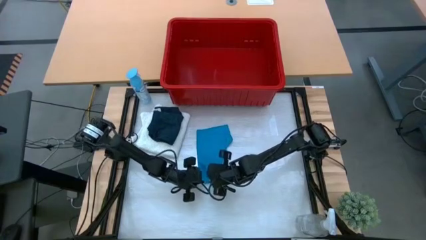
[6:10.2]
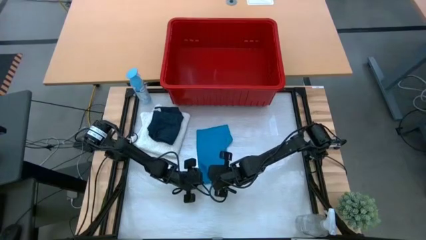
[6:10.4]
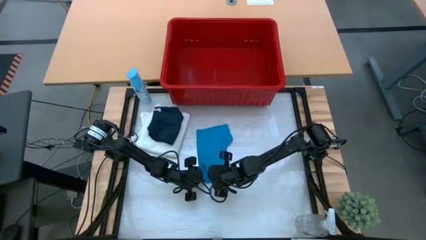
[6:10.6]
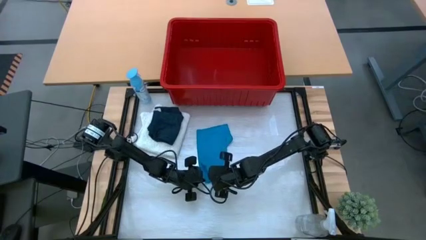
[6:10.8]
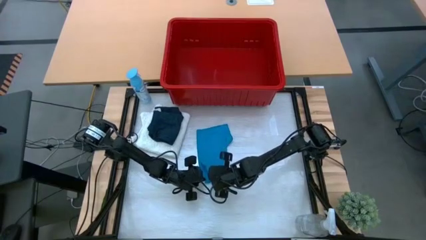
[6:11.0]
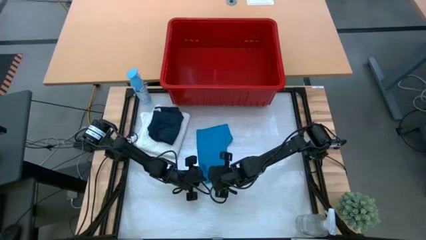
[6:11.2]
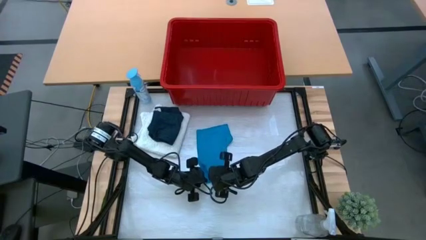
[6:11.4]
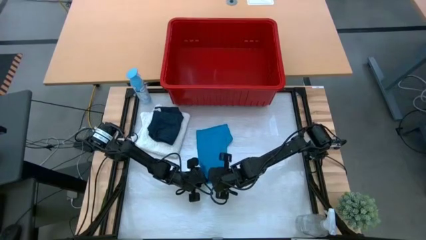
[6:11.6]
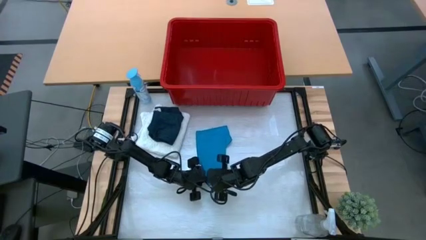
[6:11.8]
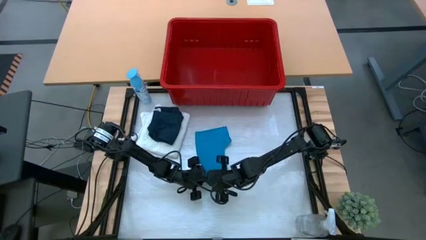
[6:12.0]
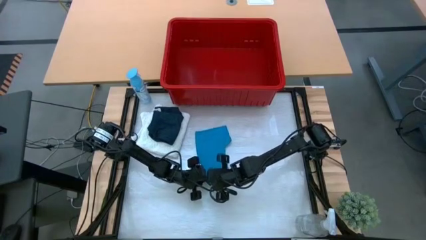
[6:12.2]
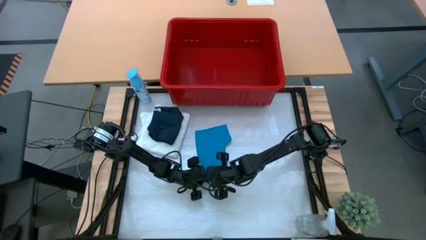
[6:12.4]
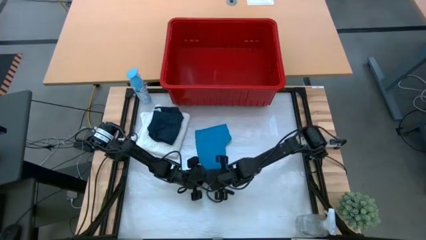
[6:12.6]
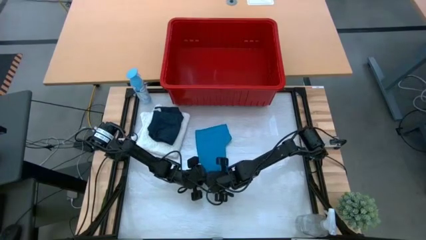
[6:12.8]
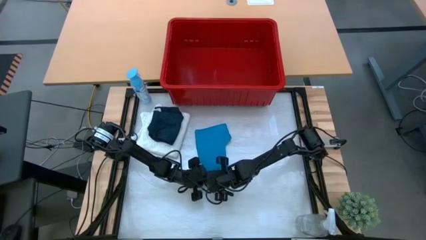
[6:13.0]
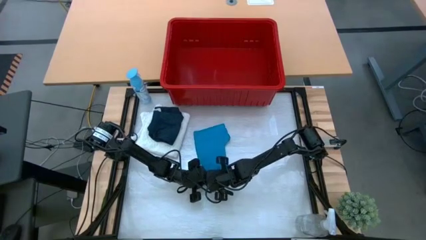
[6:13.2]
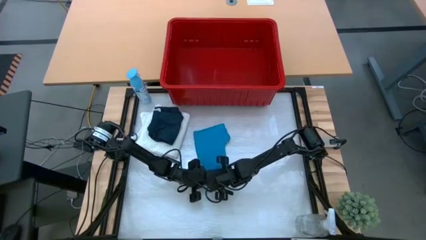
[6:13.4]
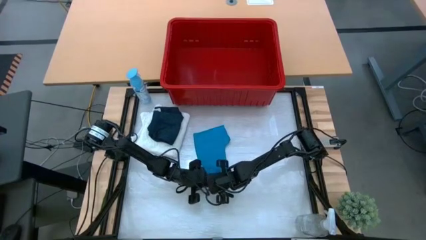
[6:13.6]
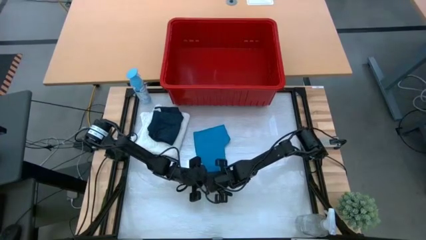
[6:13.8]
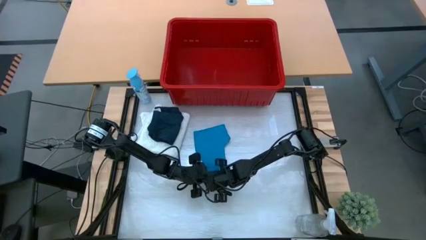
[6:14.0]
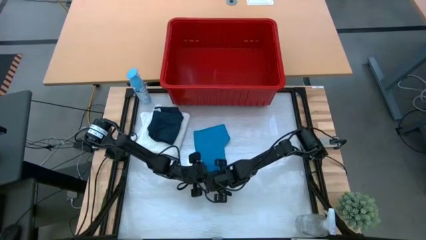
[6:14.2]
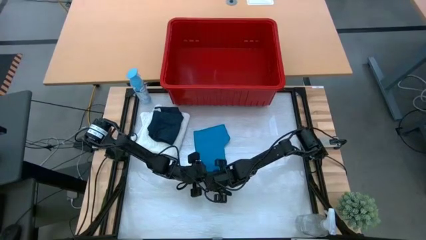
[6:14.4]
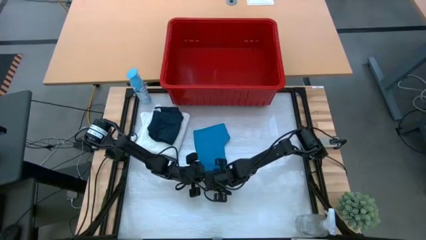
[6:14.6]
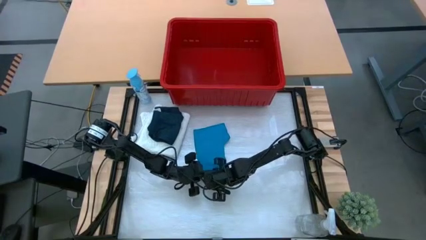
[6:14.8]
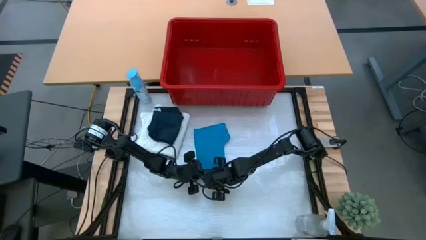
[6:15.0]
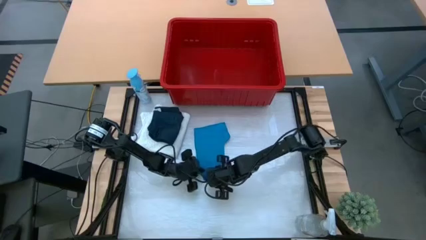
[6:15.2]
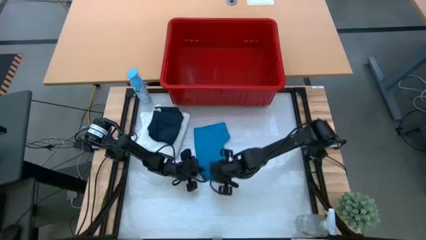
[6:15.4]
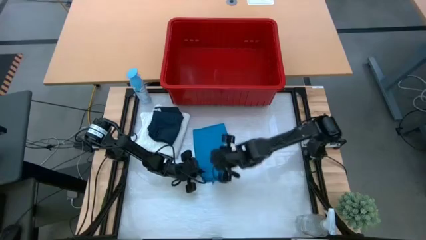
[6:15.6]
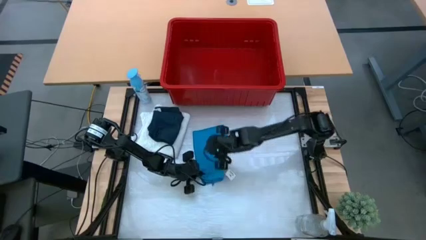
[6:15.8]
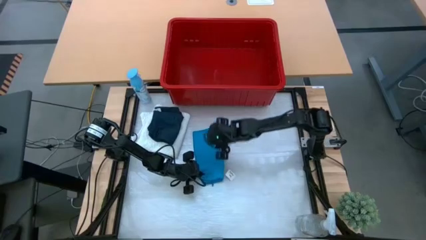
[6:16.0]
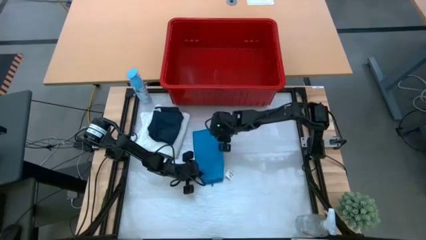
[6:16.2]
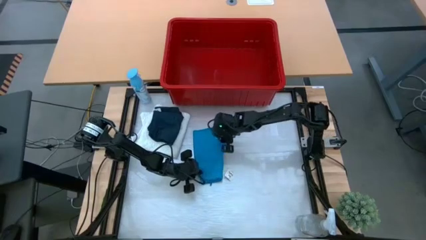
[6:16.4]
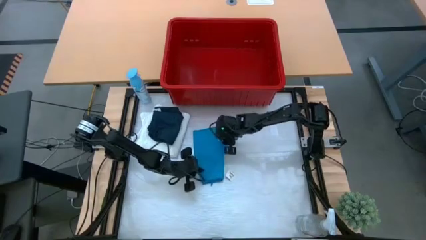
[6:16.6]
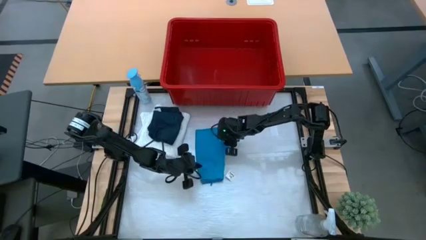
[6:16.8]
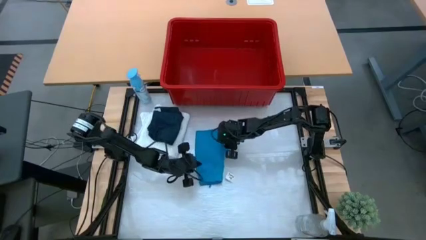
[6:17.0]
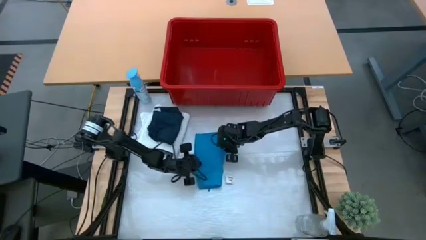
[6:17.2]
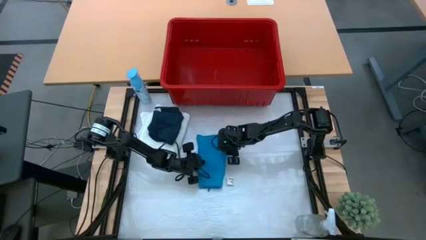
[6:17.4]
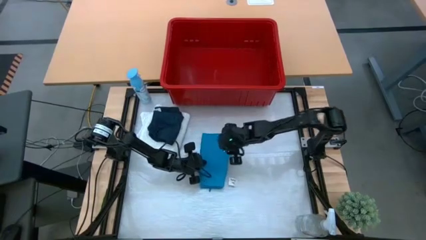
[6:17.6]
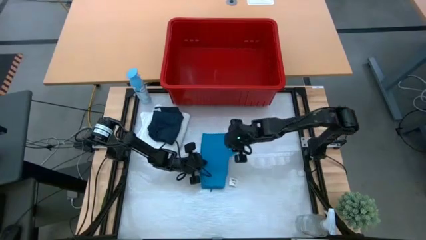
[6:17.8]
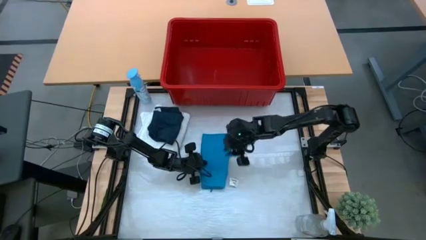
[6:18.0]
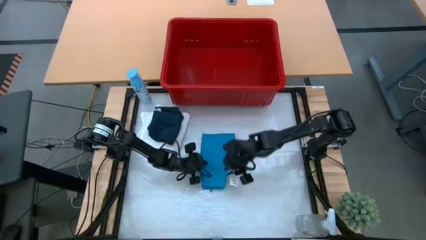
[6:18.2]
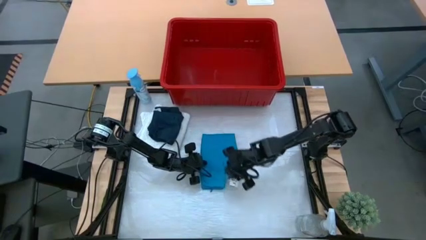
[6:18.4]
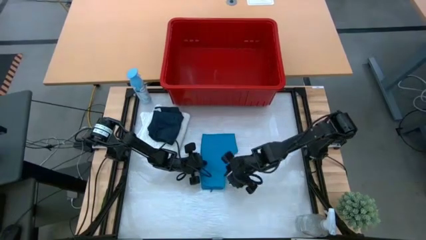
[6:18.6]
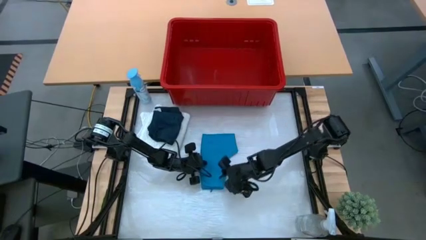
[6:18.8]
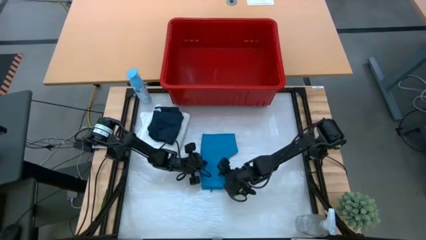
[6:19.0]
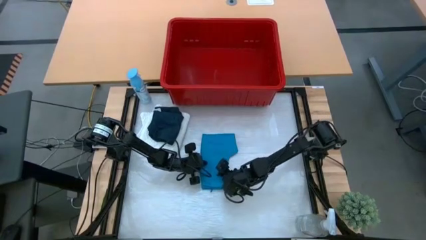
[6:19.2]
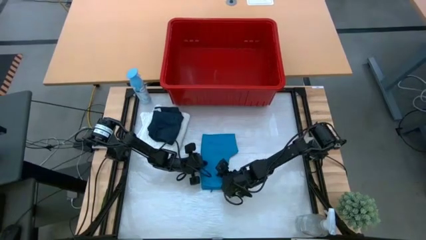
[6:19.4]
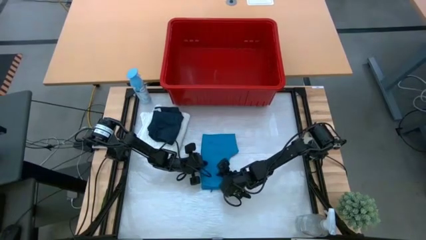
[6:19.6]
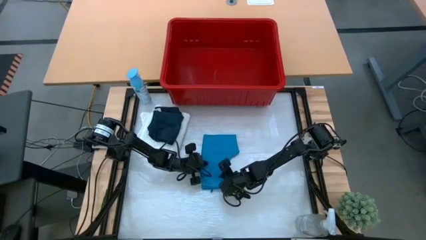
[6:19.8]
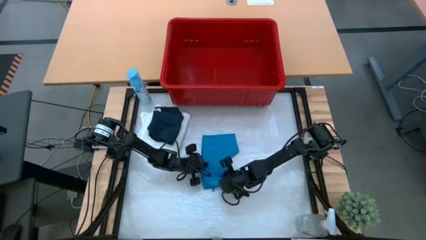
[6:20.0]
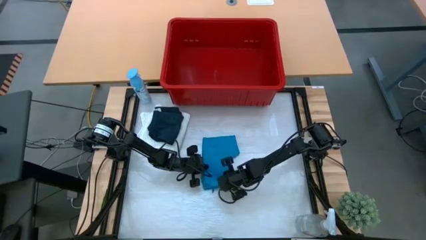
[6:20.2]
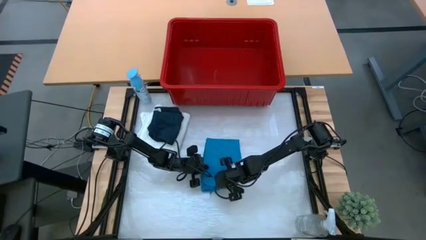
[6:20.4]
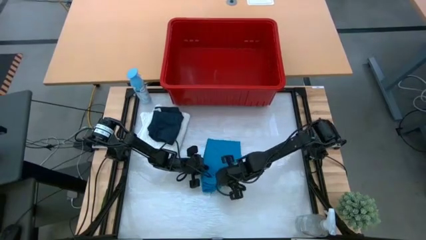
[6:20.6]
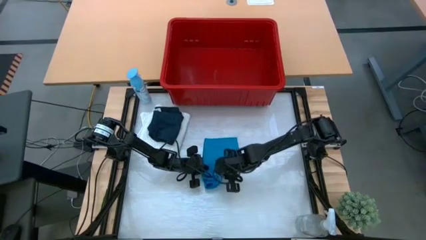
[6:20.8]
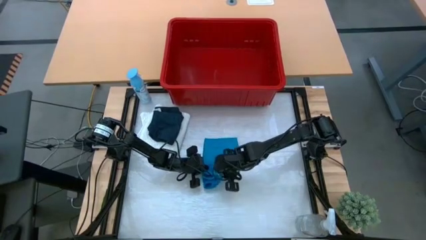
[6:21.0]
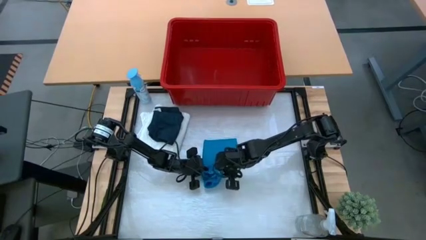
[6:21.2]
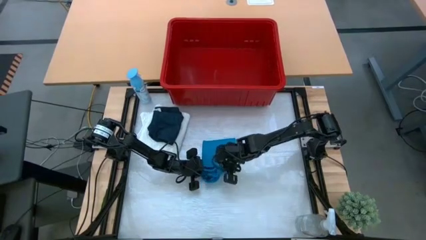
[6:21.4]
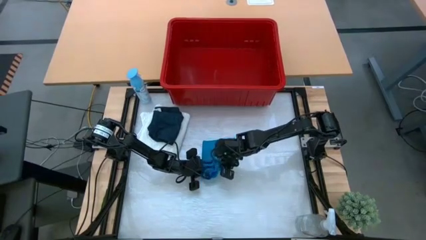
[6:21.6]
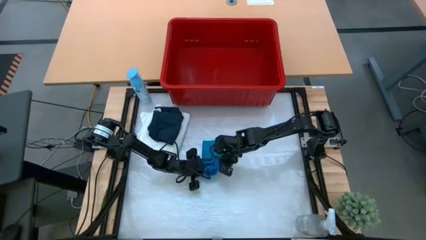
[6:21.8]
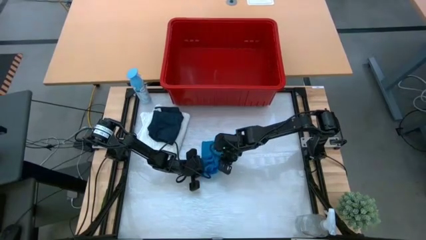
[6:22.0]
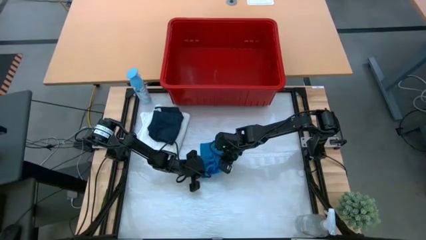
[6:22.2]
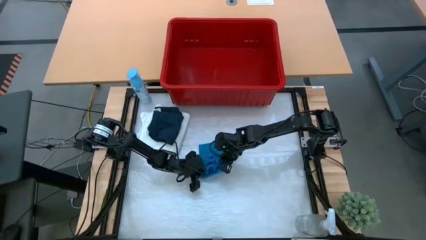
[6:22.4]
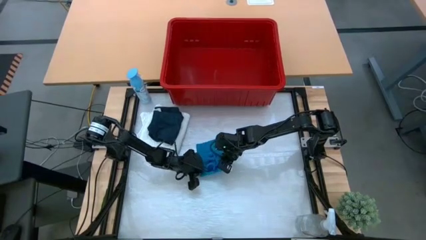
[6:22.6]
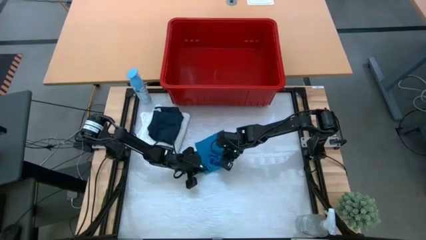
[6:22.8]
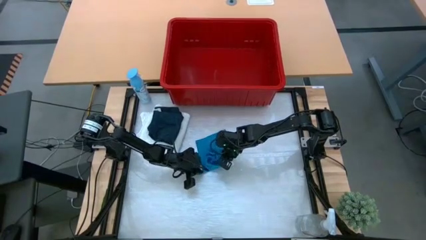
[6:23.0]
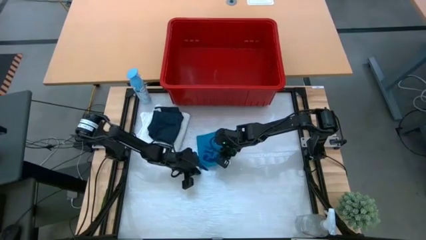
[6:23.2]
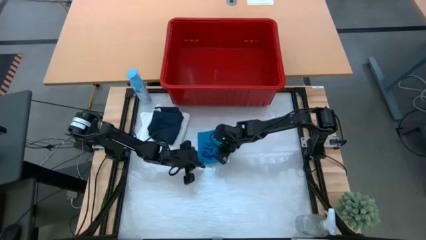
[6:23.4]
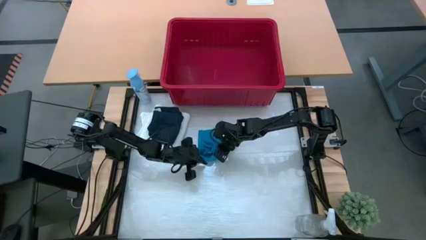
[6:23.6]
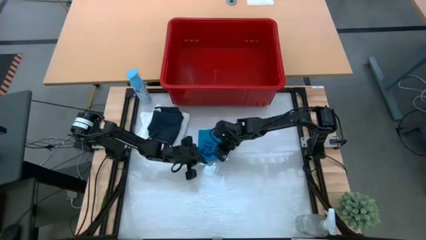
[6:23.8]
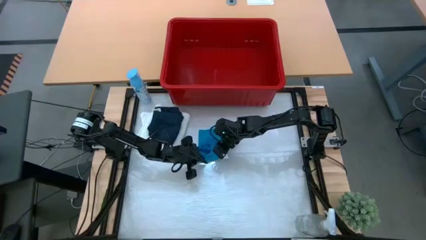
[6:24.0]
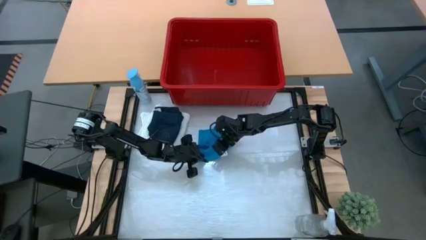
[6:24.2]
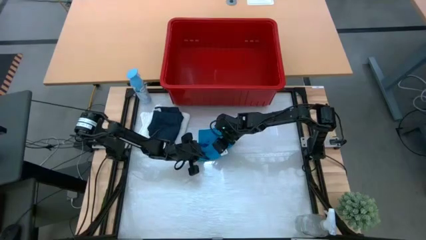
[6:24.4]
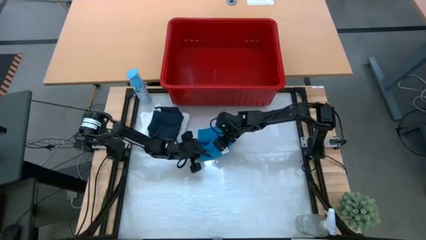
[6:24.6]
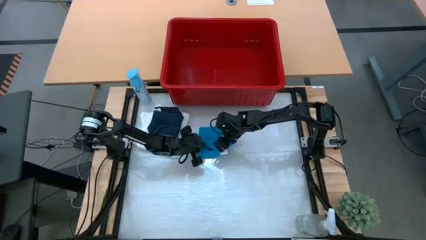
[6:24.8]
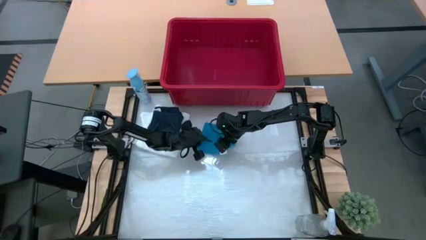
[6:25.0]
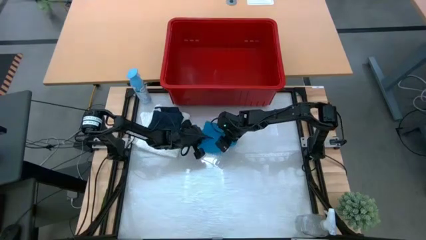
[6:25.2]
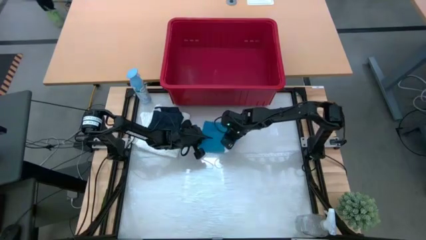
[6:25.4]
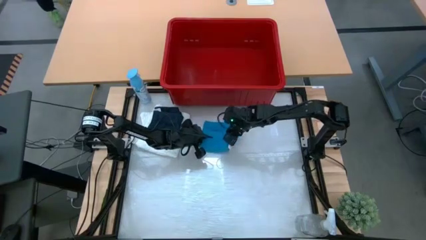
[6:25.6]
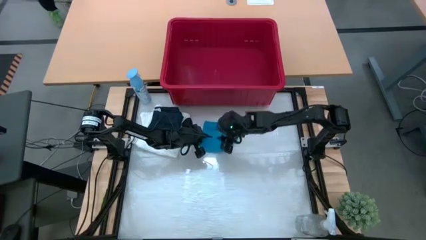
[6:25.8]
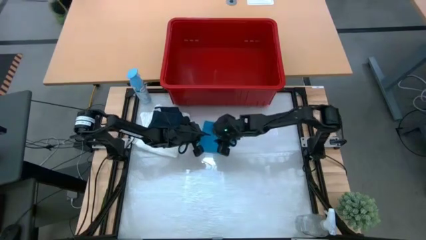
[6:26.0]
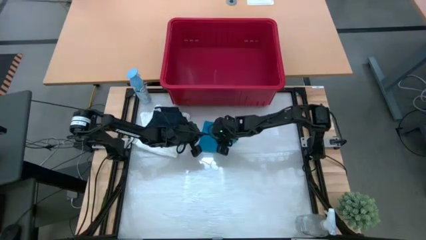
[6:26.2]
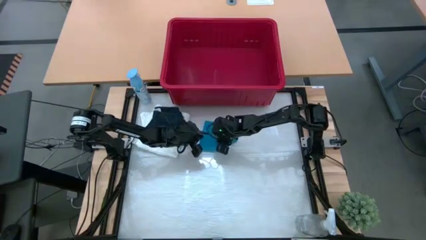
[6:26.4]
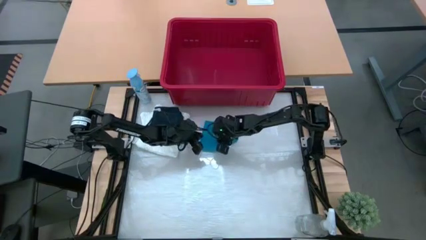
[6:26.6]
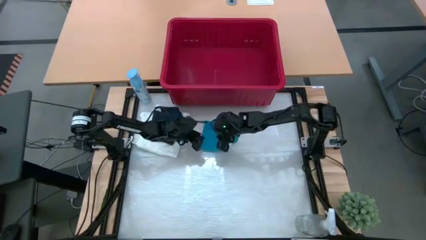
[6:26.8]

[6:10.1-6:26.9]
Task: Fold Laundry from Bin
Fold the blue shorts
